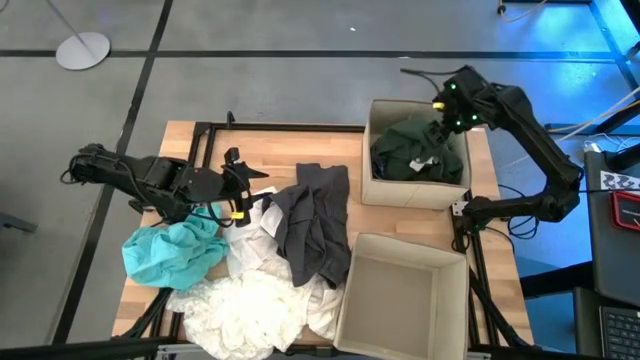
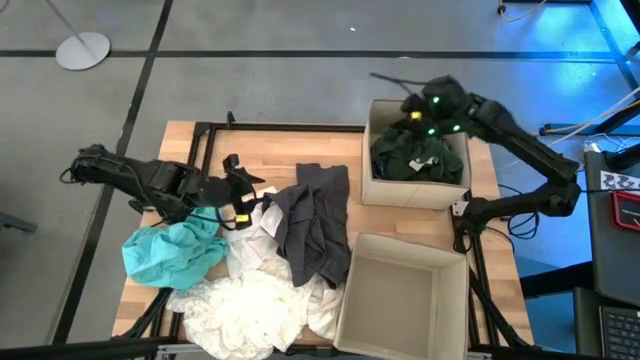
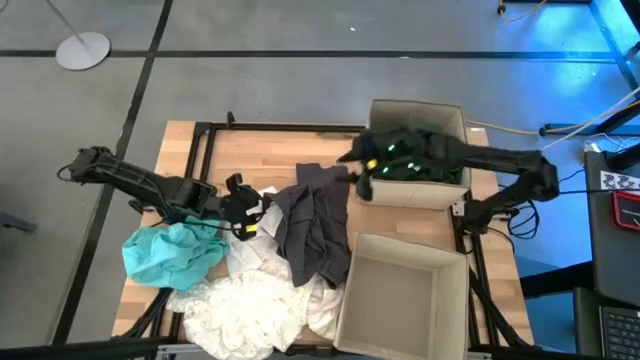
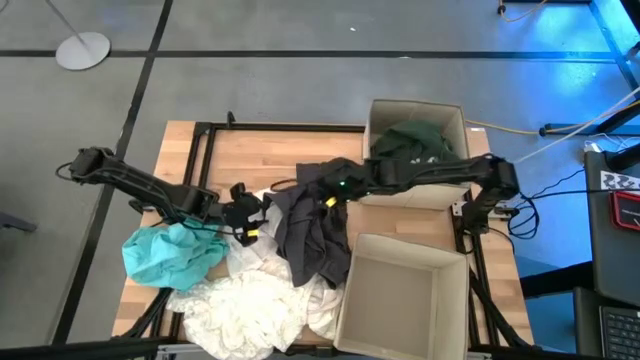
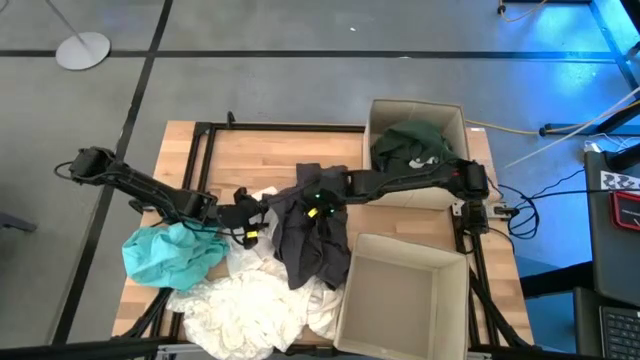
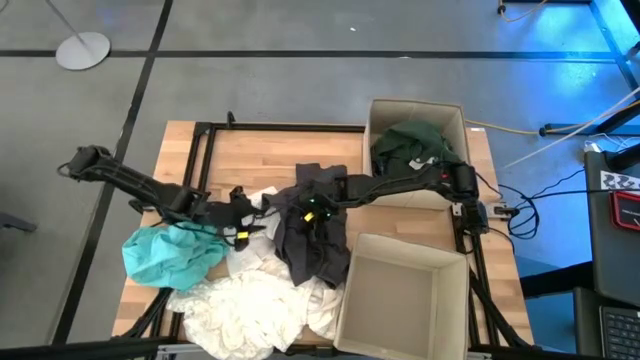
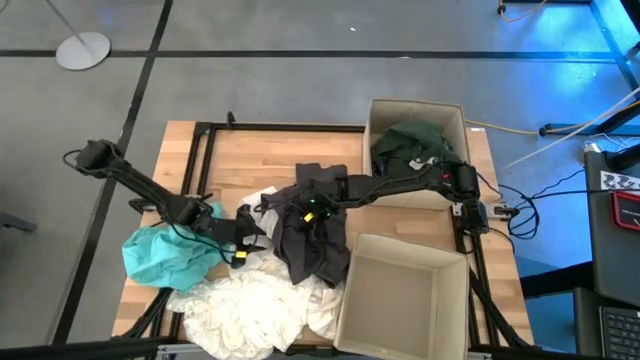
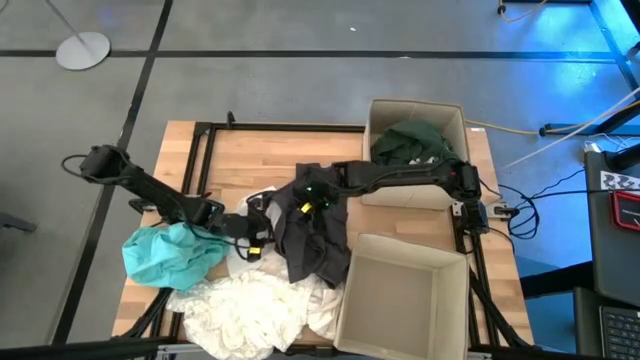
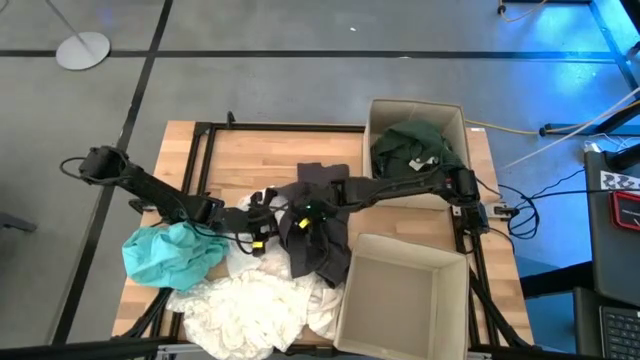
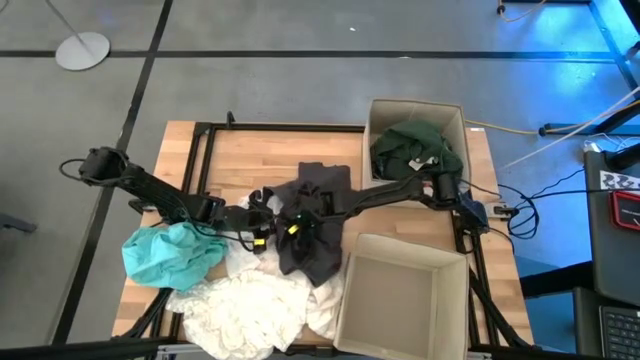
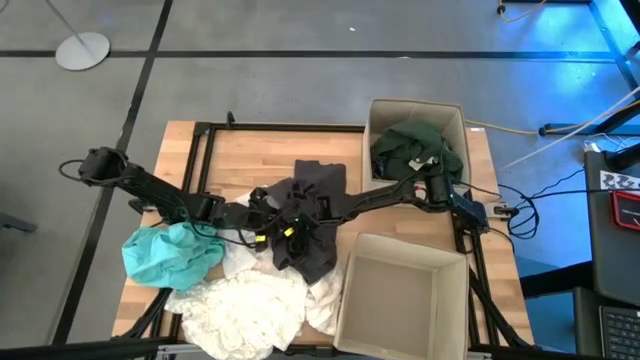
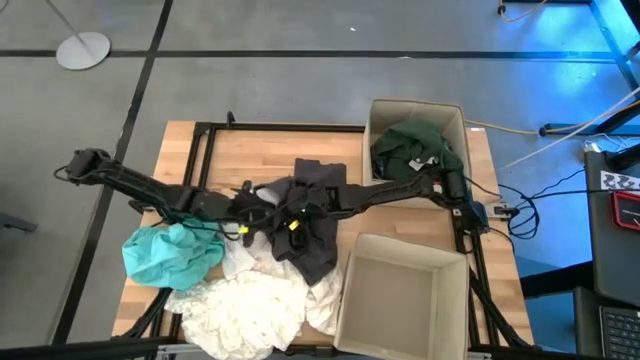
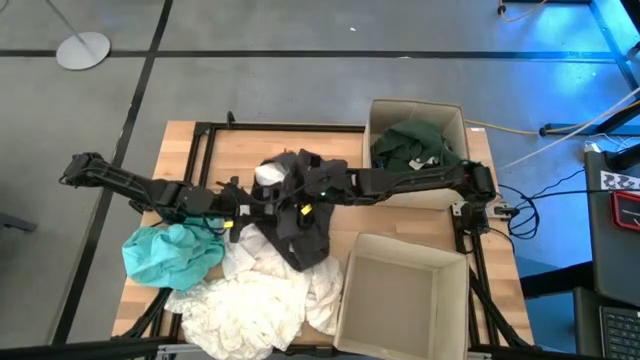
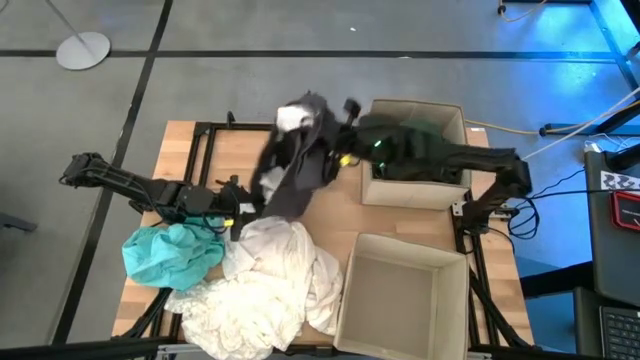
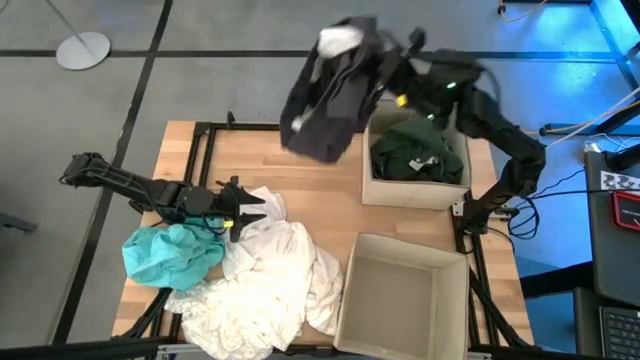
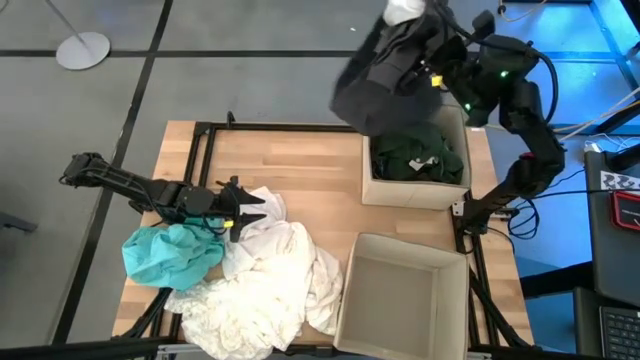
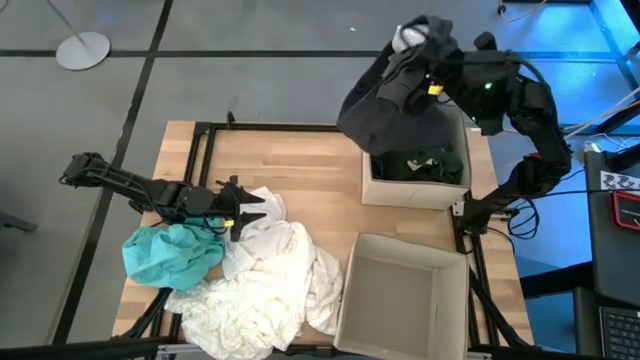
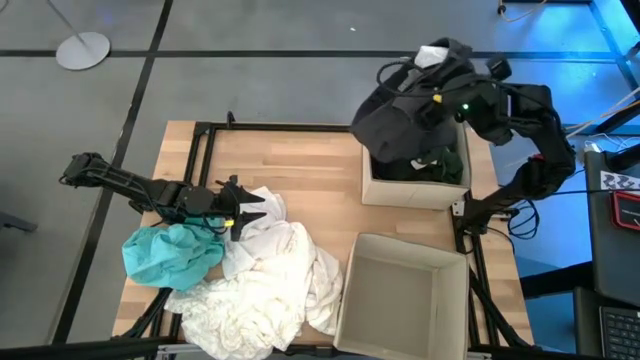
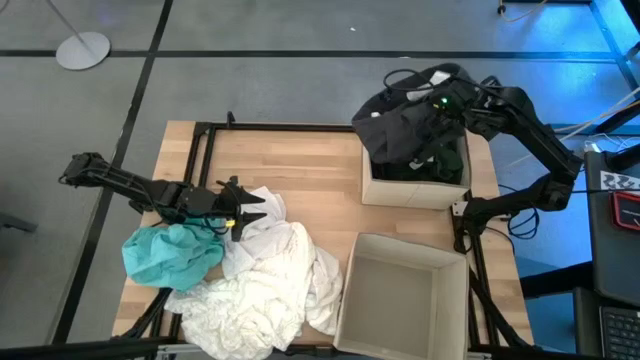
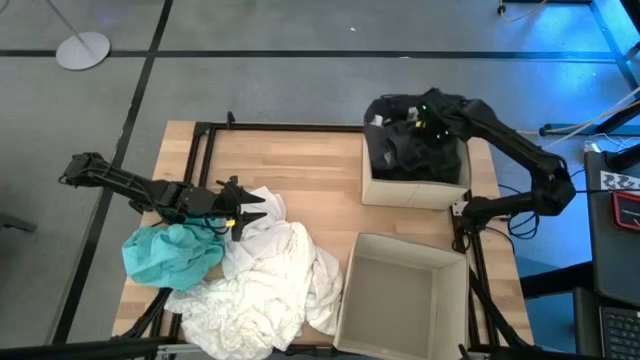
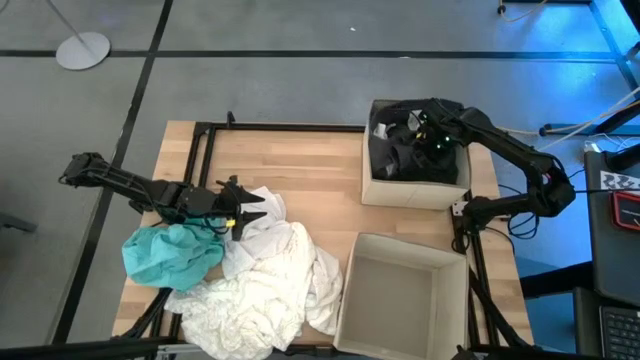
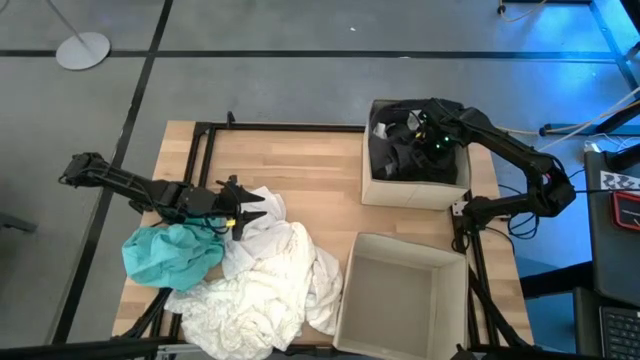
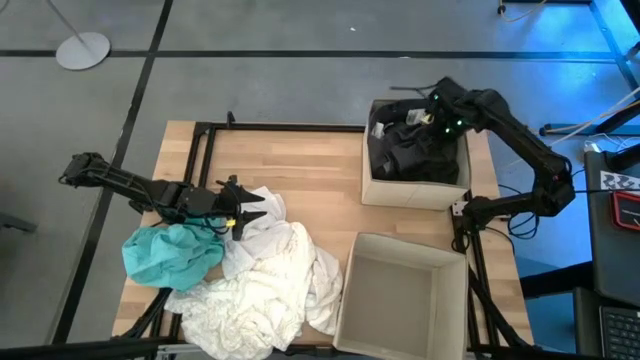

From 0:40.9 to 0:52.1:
Task: Sort clothes
Put the grey pants into the top laundry organizer

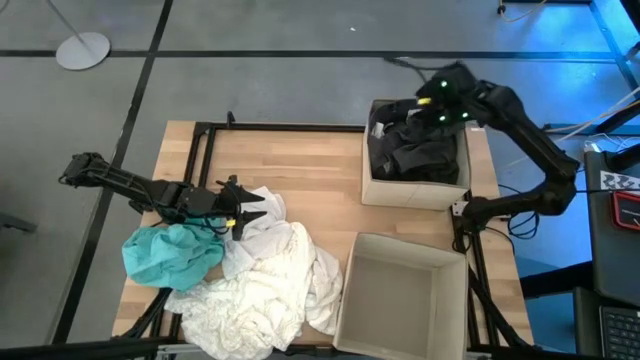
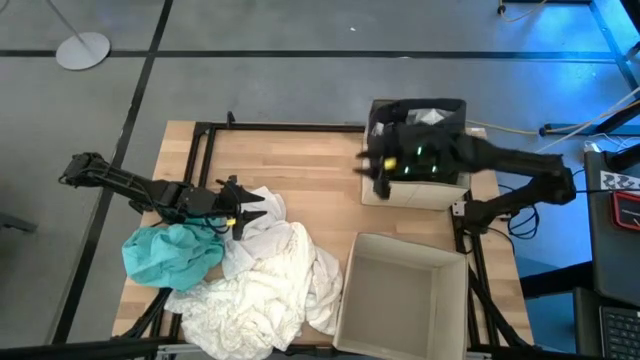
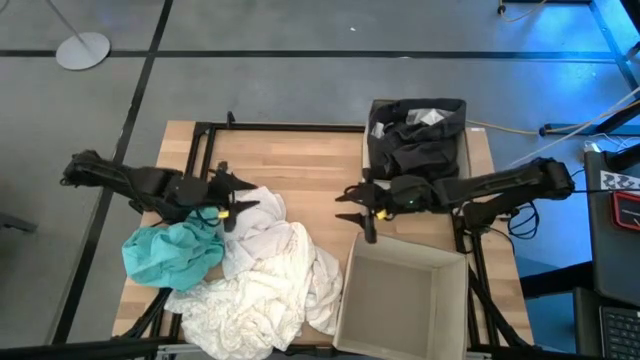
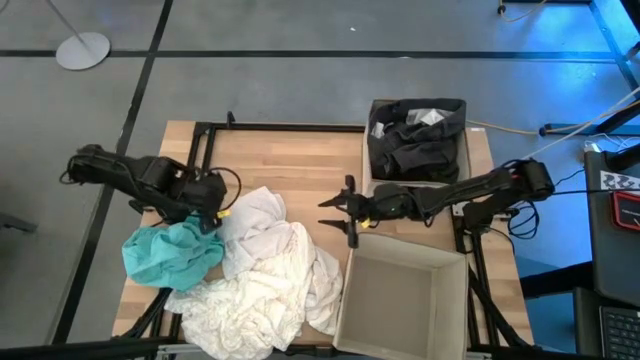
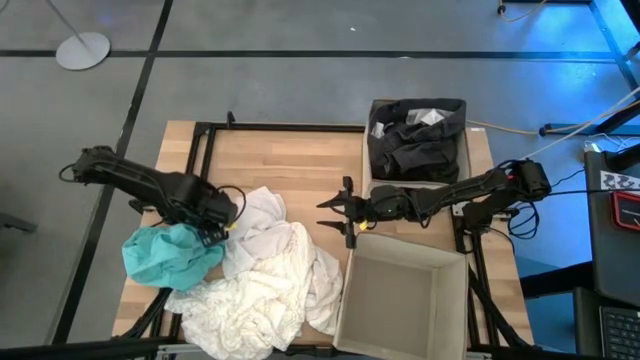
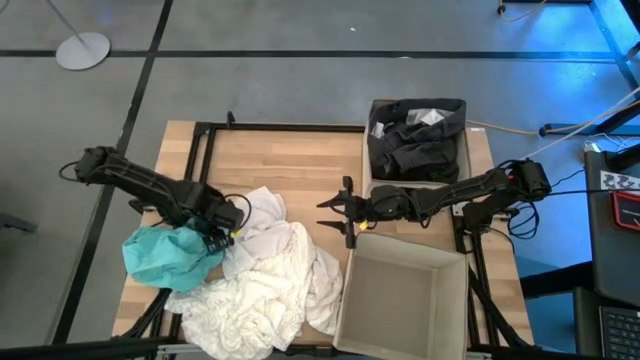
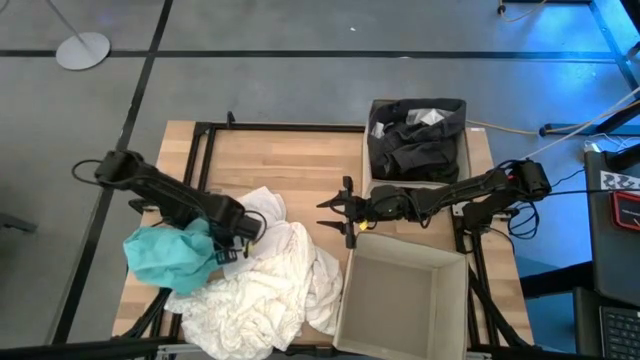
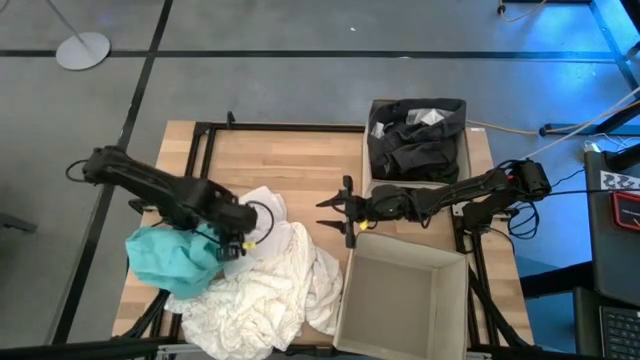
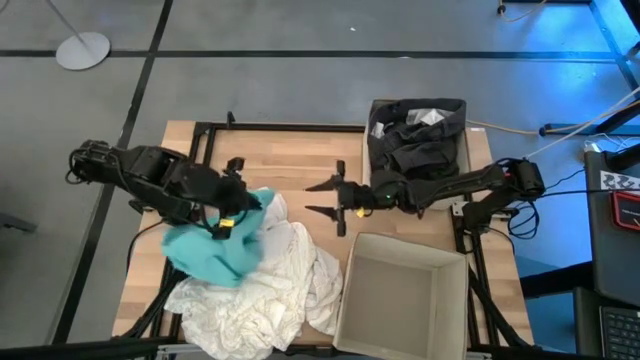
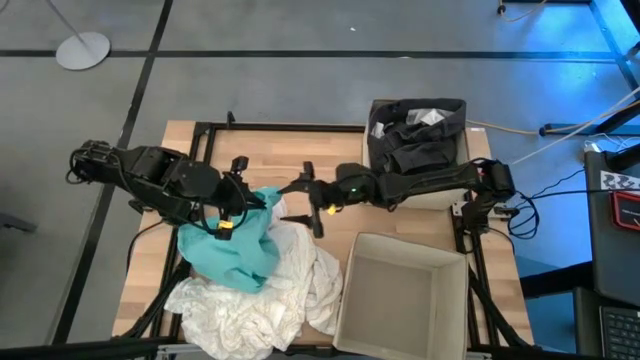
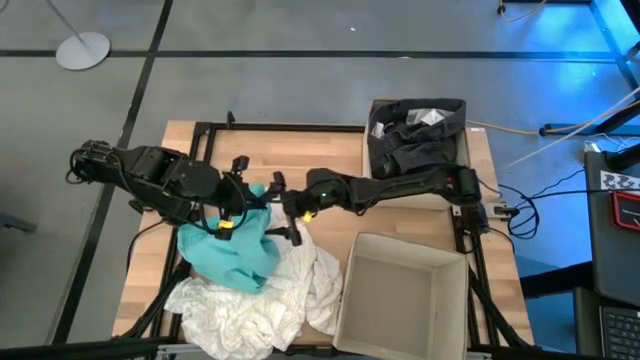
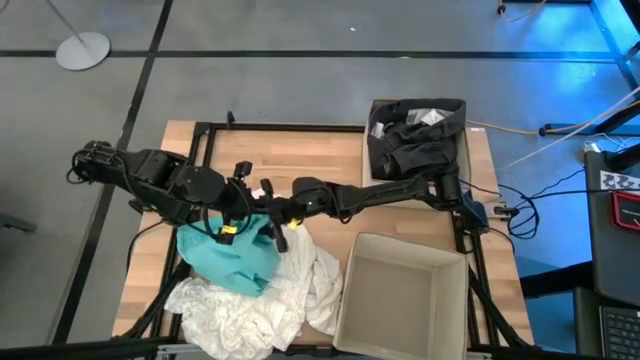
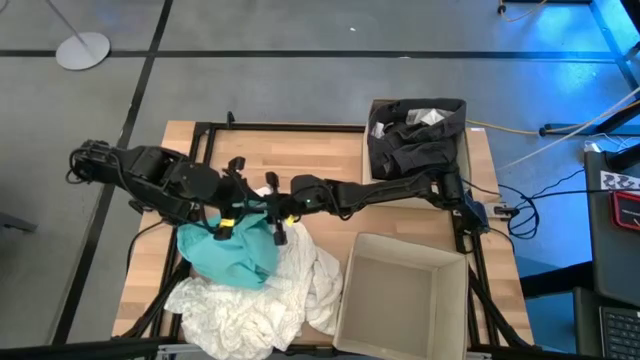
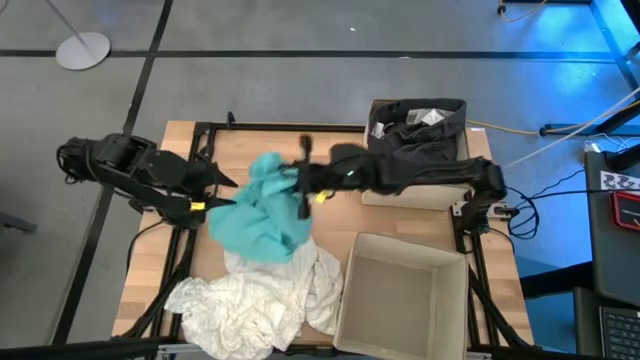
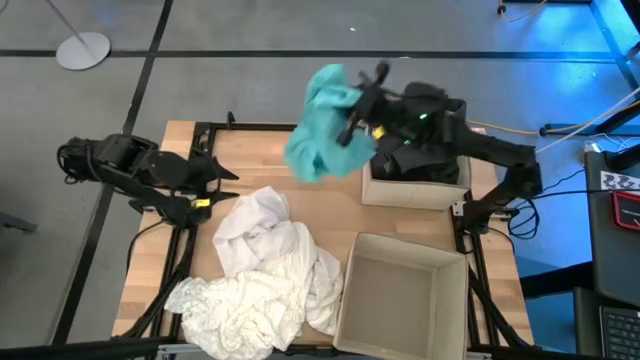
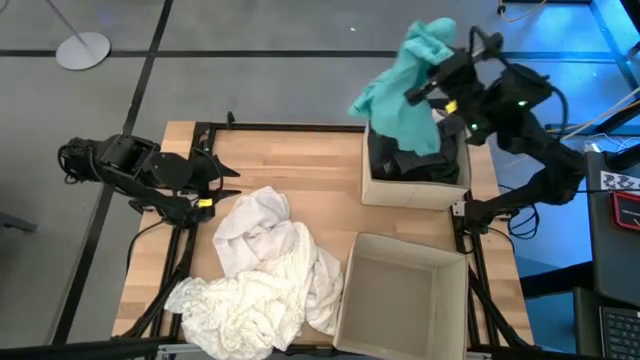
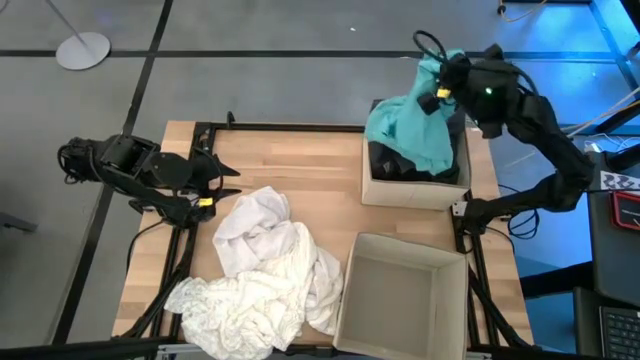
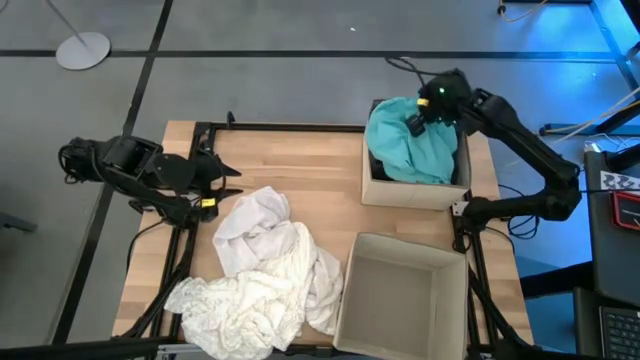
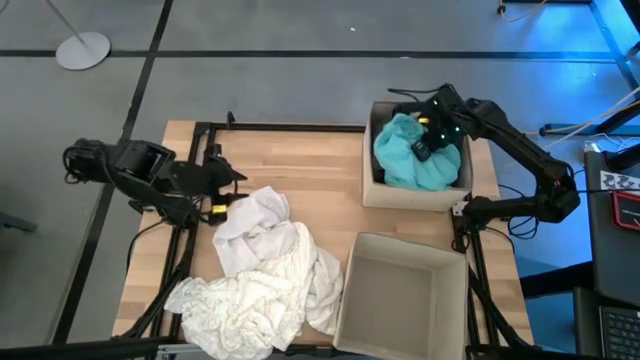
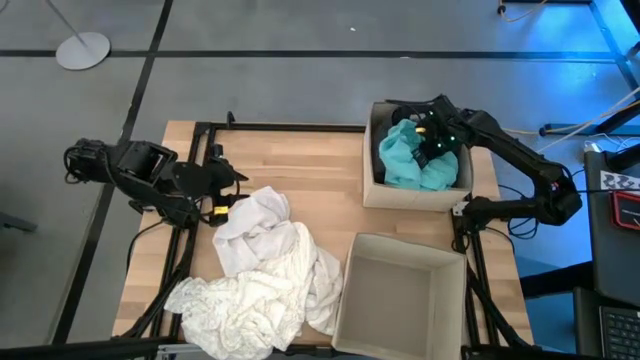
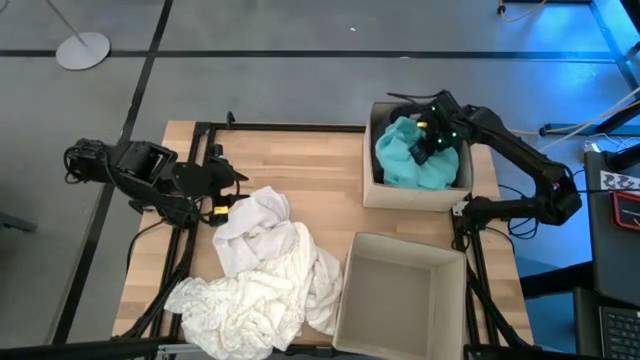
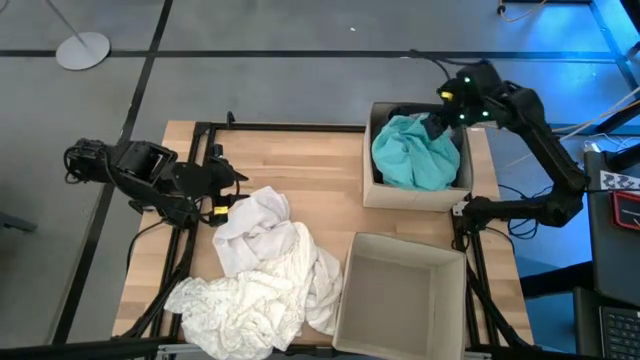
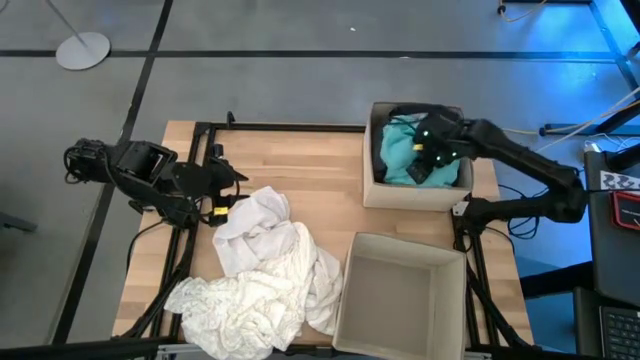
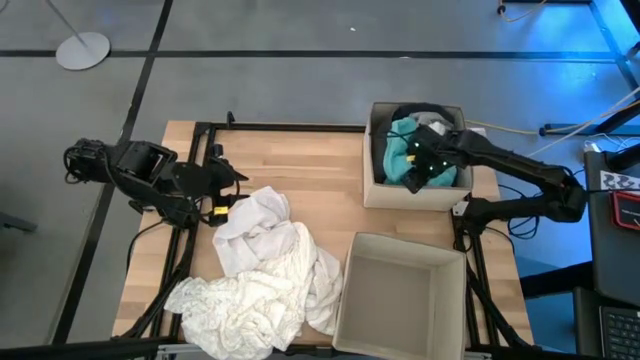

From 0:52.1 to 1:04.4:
Put the light blue shorts into the top laundry organizer
